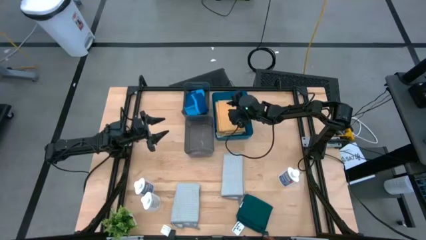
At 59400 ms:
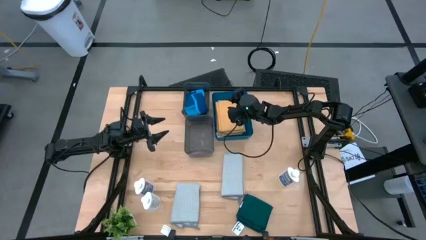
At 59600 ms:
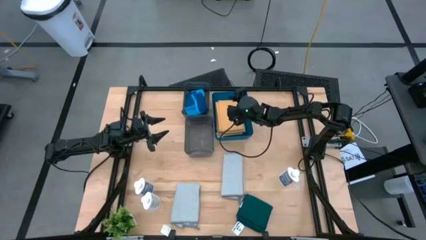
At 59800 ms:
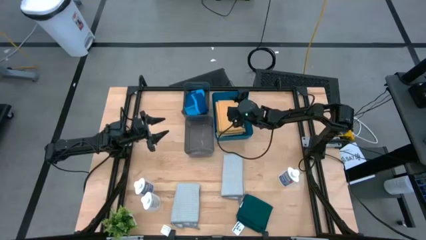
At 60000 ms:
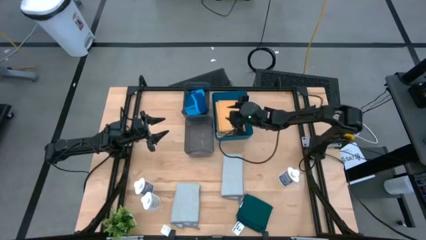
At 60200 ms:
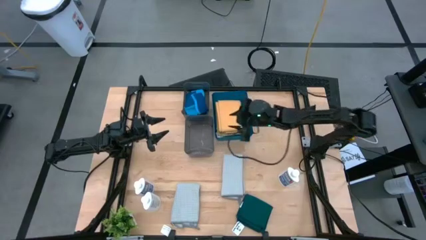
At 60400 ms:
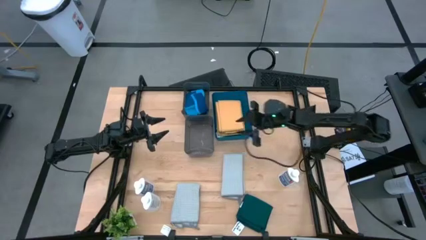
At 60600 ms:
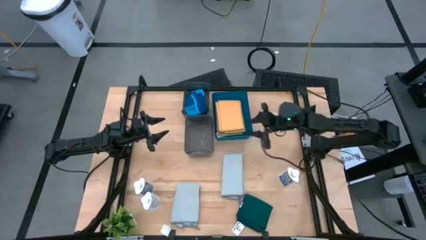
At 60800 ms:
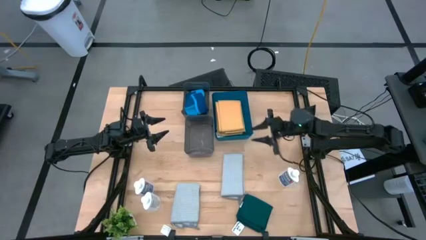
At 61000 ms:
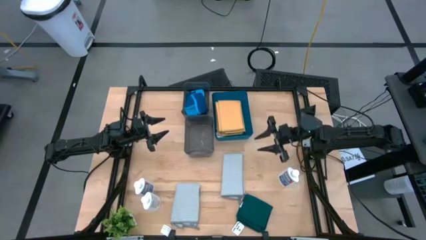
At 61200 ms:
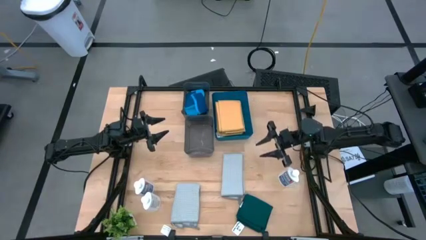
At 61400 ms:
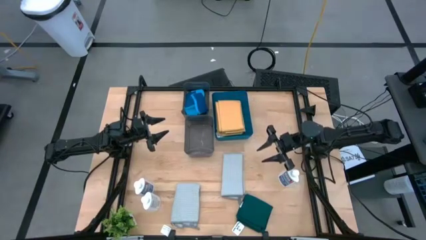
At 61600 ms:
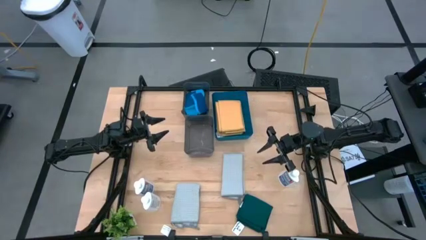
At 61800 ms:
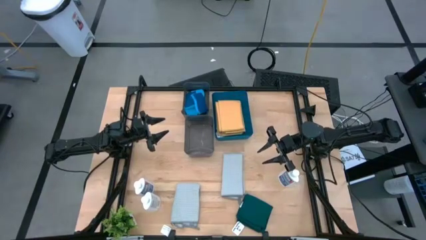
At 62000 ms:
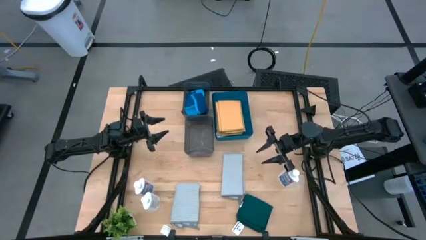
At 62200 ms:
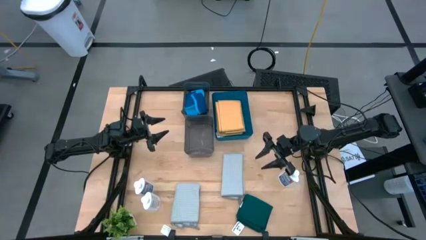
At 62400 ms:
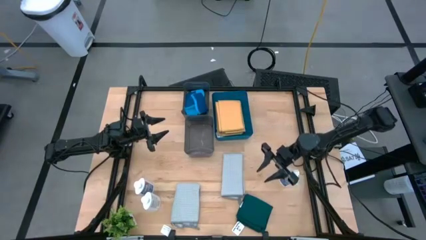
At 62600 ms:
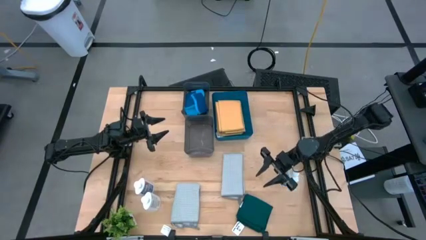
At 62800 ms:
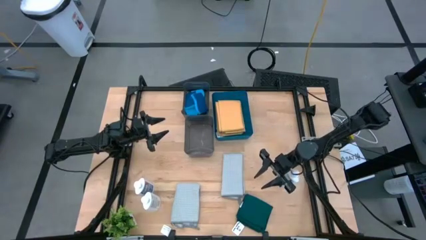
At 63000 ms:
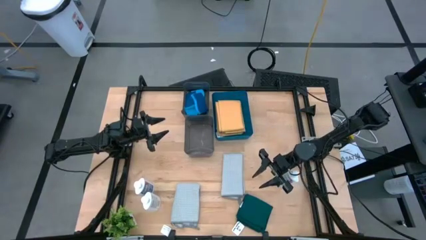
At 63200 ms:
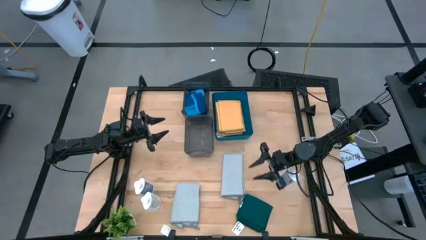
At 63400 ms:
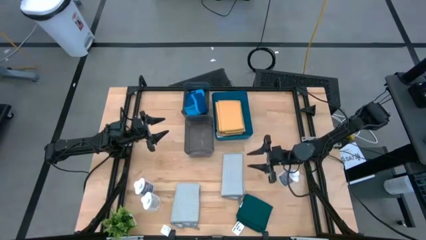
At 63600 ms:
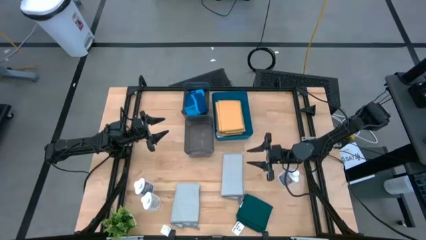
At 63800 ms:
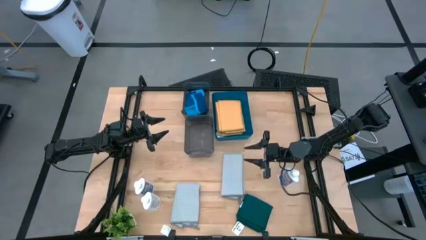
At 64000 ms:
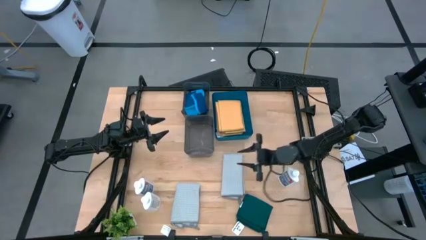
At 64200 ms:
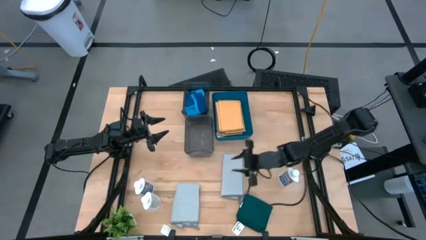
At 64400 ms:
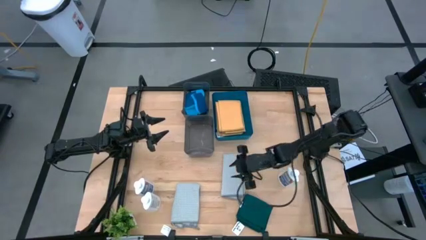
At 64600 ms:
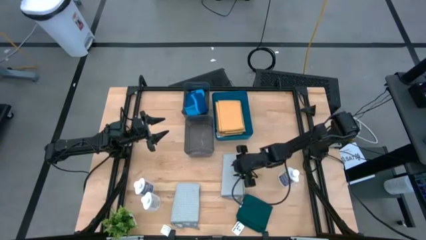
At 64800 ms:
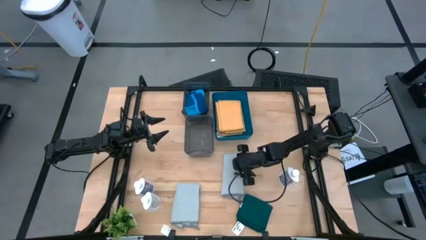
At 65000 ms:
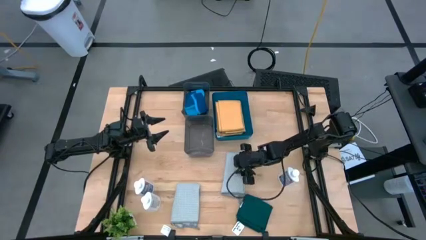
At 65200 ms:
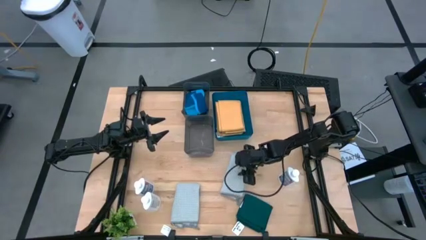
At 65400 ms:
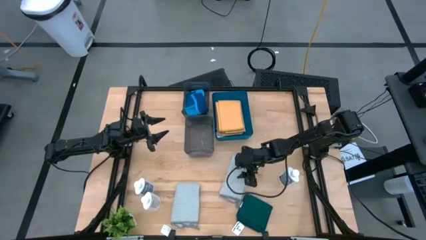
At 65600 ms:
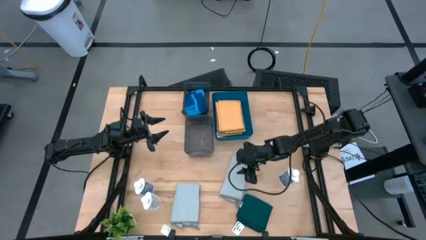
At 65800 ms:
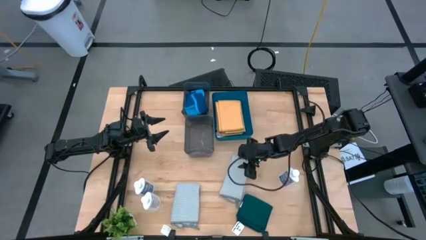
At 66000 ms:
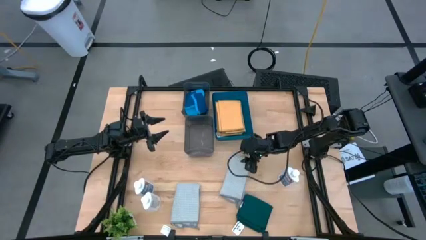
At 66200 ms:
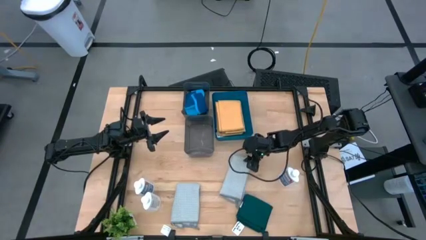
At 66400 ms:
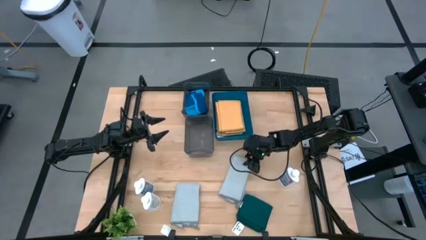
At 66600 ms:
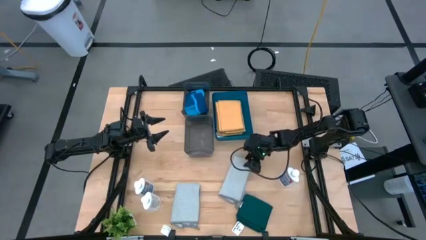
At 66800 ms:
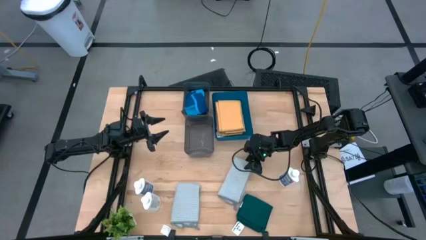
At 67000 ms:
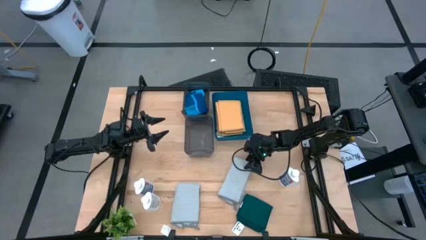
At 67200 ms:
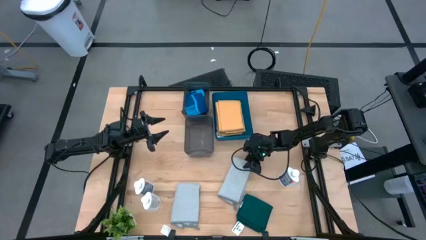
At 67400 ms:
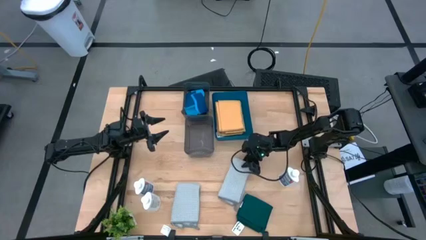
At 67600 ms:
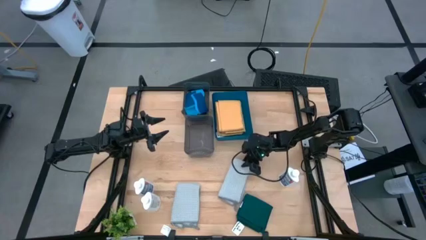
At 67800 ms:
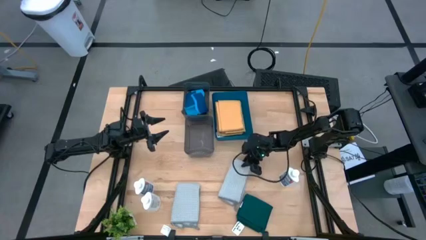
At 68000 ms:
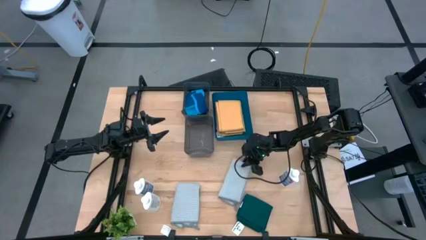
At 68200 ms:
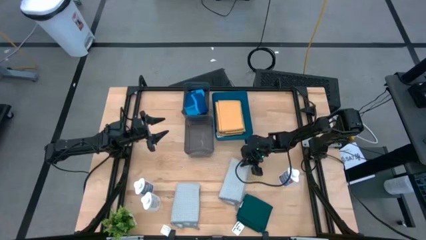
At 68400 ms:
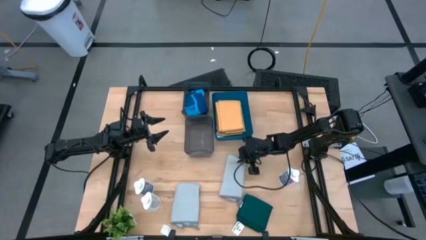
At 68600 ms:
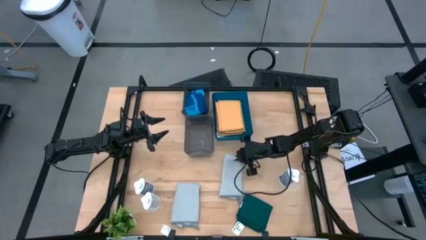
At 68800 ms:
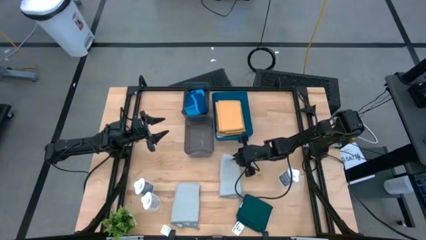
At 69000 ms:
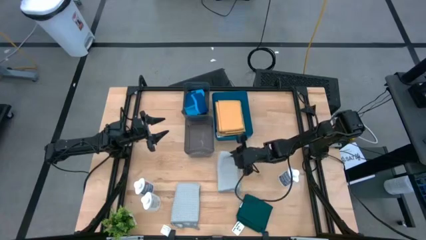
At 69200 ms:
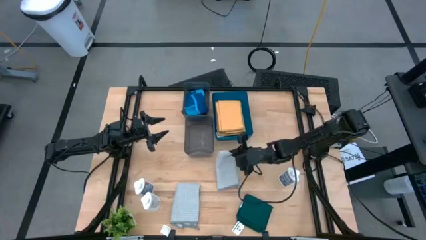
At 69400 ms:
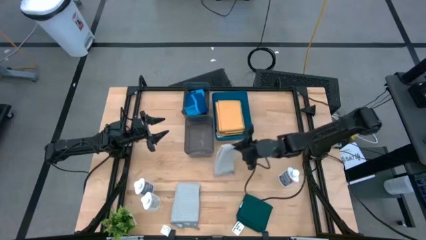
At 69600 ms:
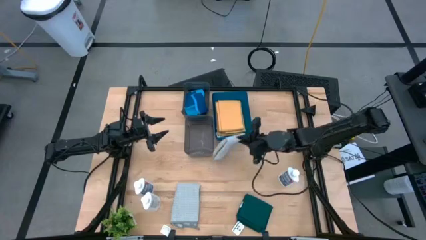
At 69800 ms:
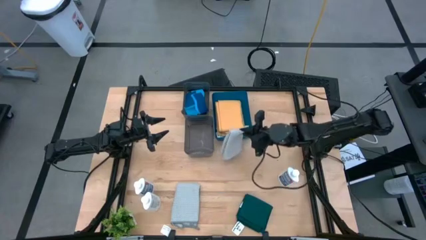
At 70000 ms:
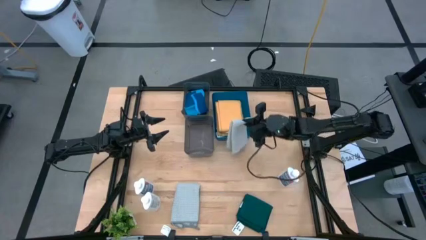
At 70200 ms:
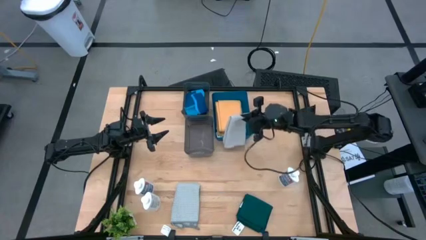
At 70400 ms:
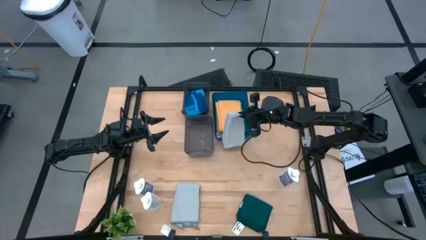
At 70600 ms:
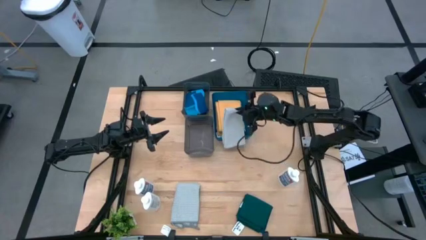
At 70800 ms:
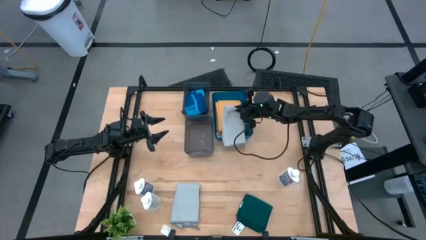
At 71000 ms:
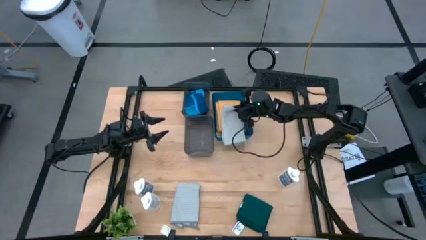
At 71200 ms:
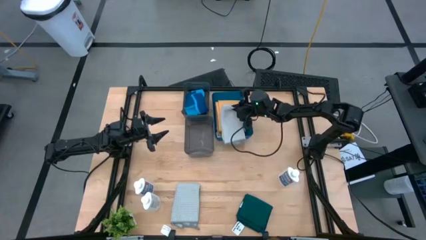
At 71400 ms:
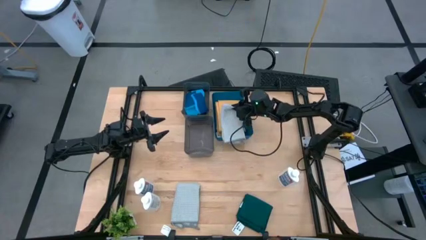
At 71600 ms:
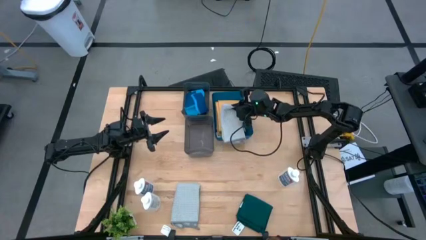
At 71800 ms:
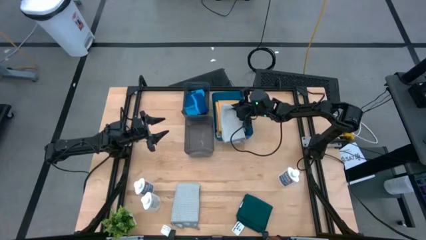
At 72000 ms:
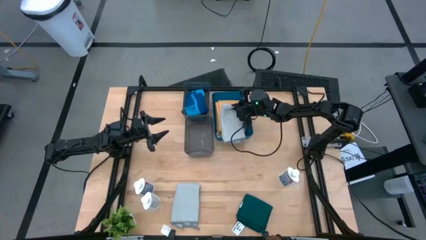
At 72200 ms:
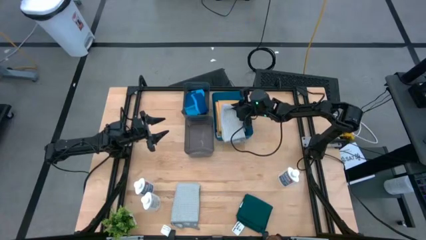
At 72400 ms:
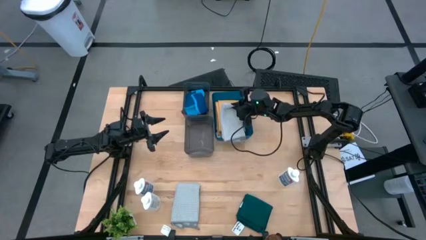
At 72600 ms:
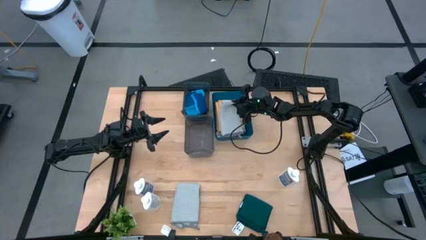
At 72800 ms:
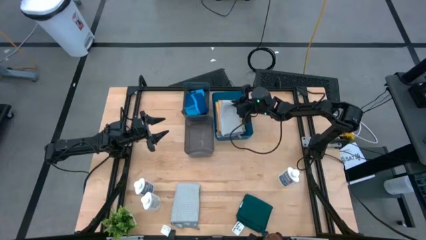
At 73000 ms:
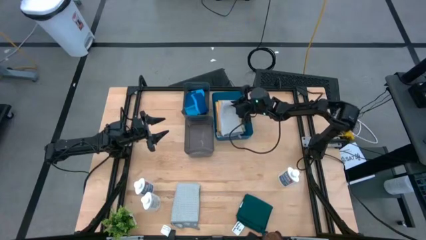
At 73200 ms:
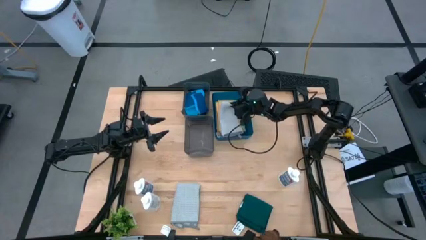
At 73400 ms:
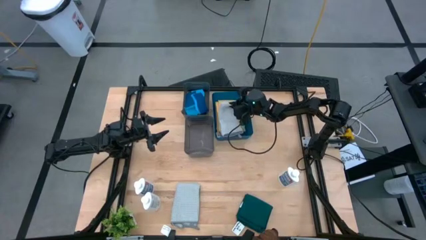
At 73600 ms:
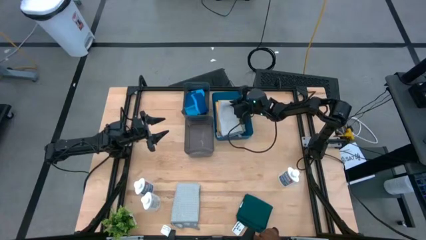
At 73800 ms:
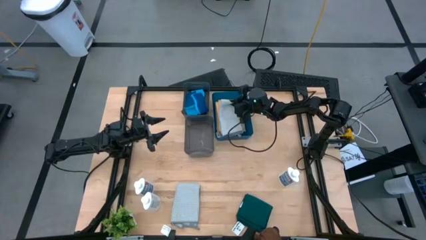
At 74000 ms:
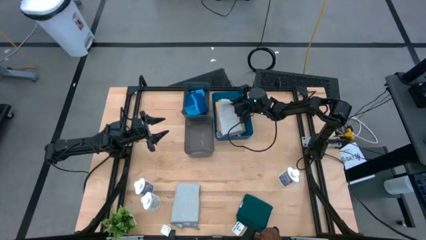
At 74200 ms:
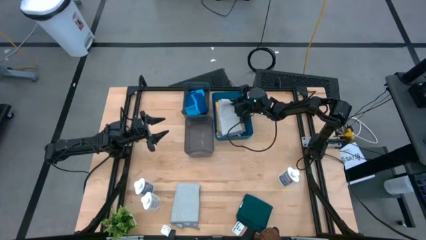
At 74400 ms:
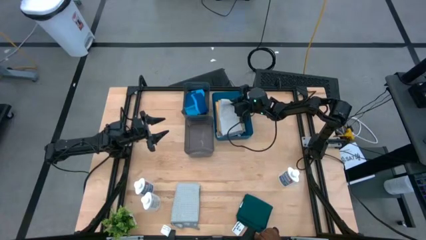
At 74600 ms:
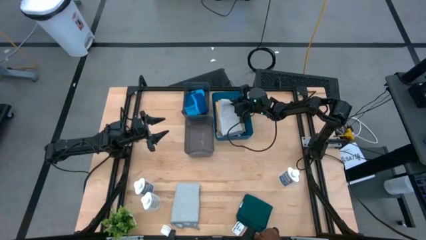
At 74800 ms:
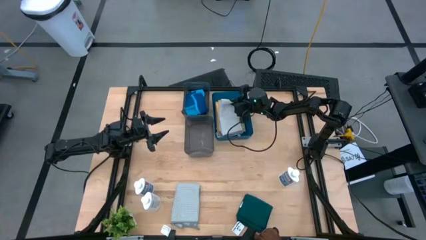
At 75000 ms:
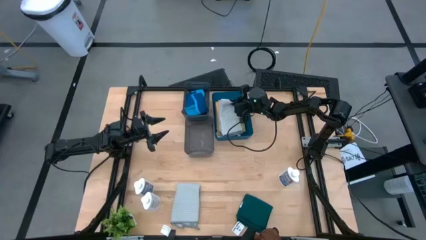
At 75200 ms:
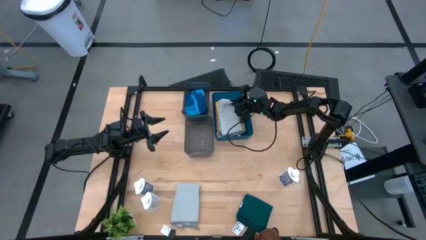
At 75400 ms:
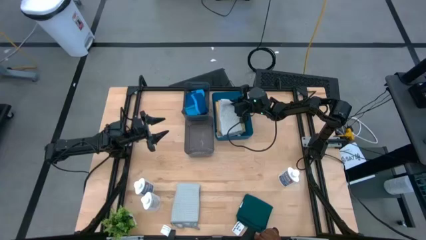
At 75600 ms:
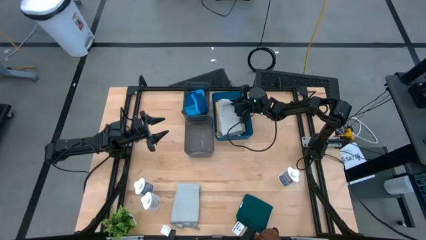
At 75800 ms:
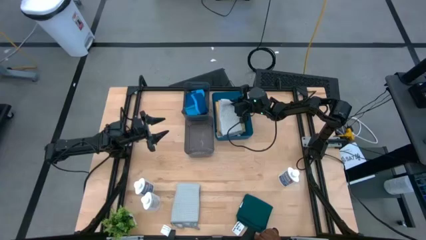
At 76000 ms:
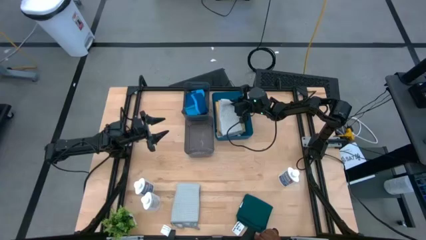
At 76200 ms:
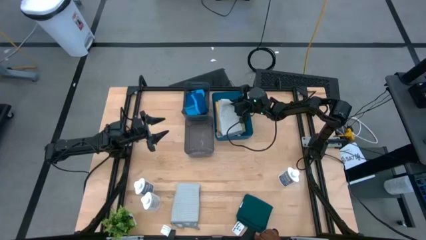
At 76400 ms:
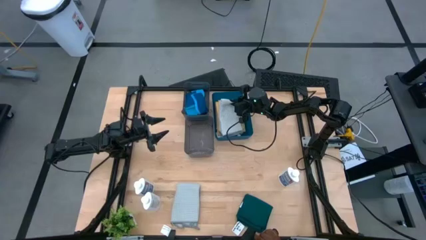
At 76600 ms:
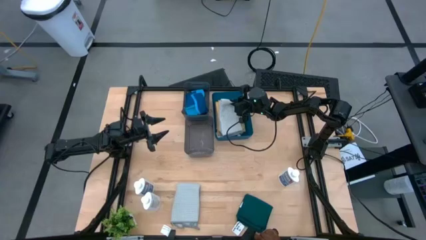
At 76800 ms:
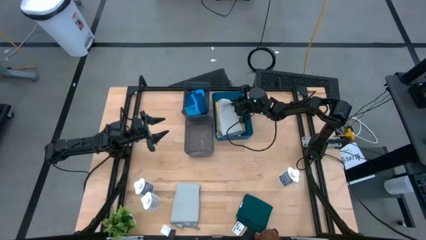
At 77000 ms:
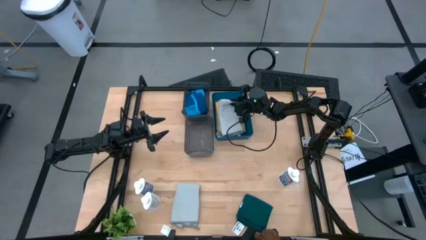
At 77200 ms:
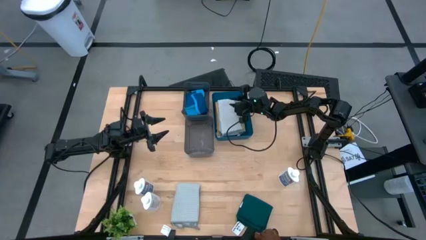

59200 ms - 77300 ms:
Task: Pick & Place Kitchen Items
Put the gray towel into the blue bin
